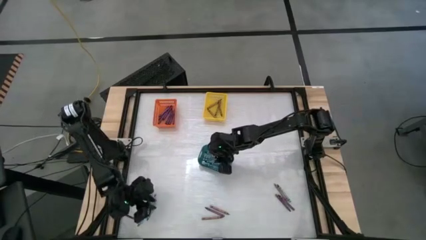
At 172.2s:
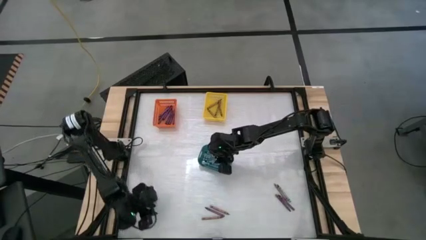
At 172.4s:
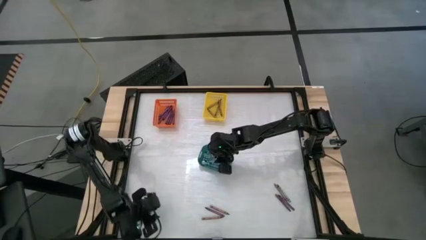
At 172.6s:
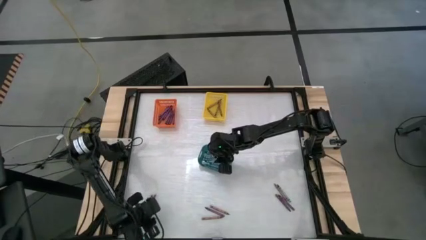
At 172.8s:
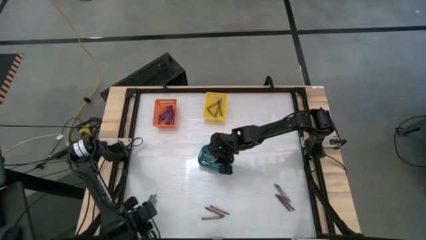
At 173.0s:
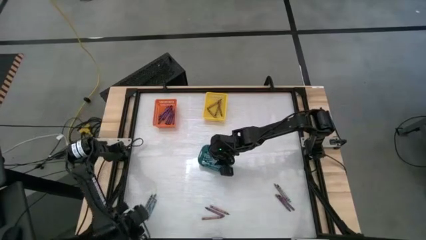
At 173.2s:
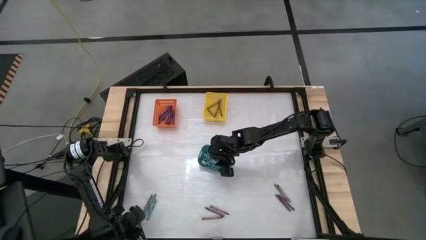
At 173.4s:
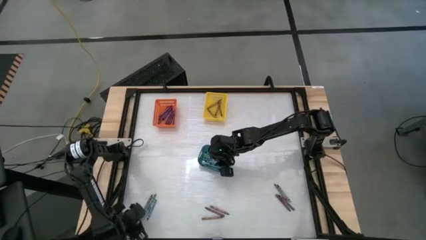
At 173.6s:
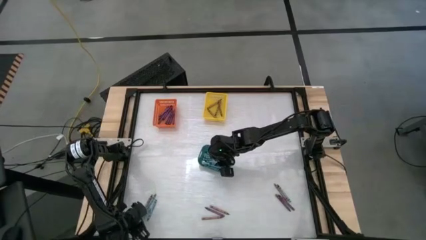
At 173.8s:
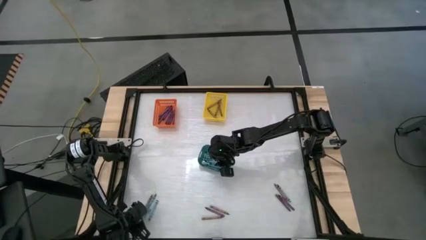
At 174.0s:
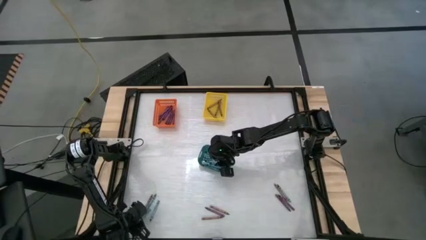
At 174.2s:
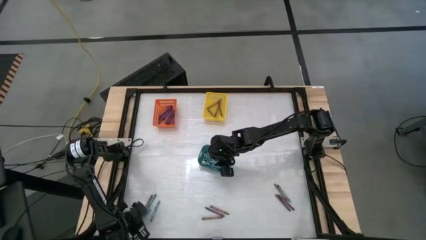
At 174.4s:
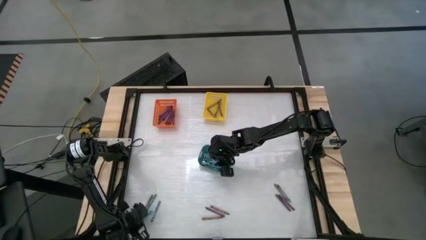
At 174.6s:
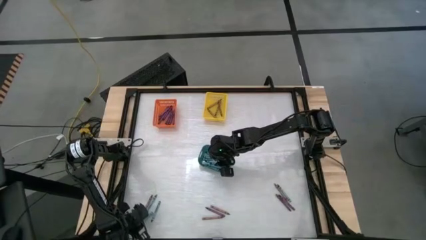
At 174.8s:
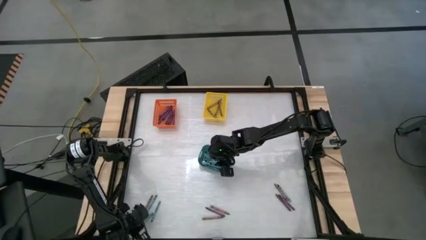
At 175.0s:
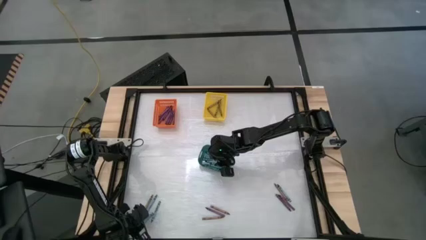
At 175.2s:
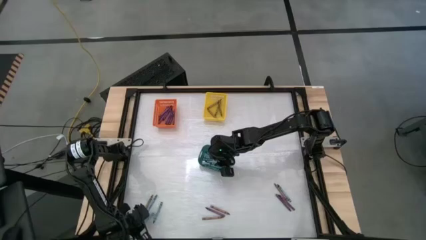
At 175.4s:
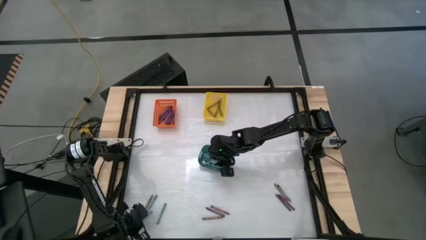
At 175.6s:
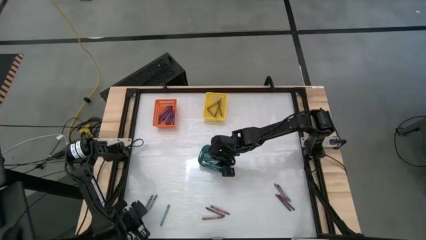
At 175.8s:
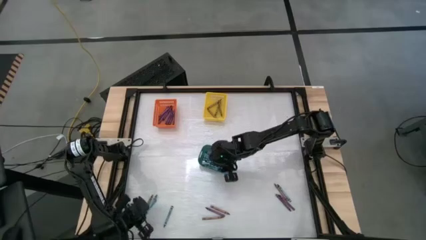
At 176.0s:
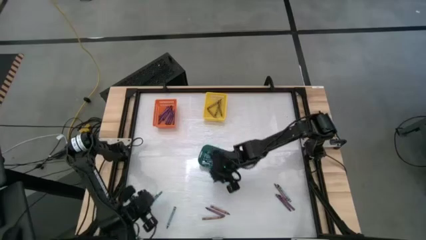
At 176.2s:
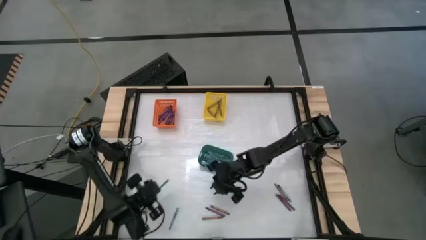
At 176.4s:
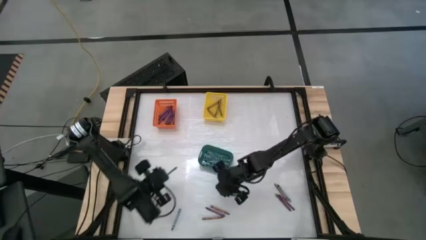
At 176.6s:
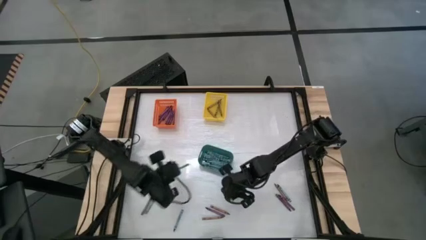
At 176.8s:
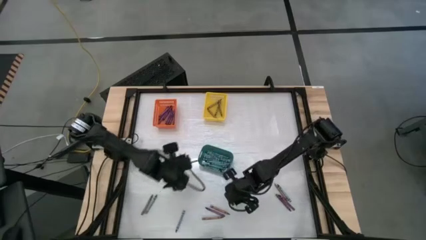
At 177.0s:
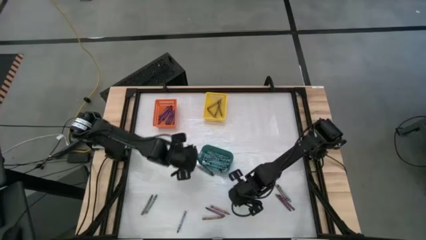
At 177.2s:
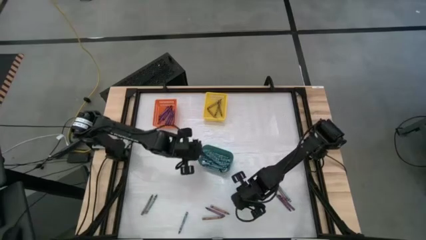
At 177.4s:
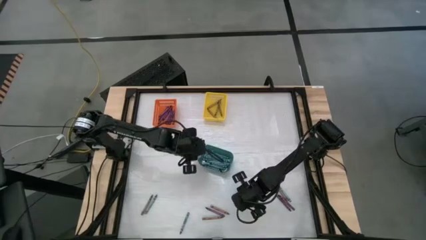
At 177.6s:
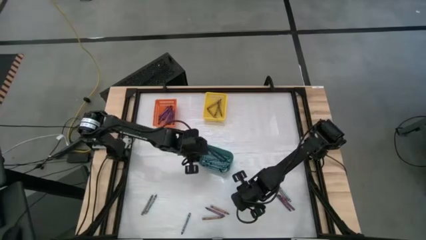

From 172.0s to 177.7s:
Task: Sort crayons
Put the blue crayon into the blue bin

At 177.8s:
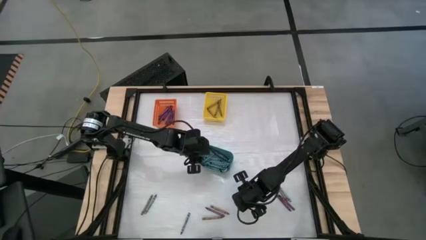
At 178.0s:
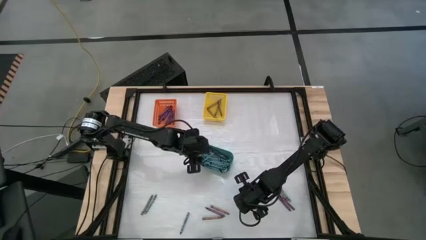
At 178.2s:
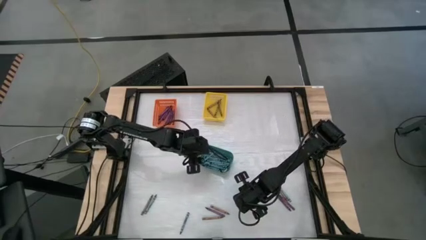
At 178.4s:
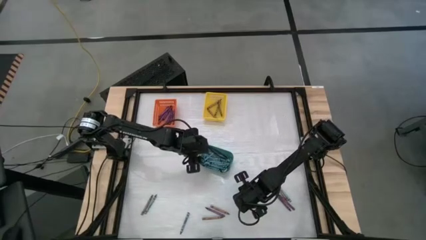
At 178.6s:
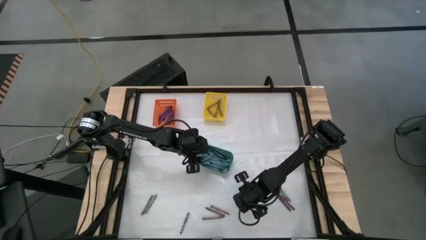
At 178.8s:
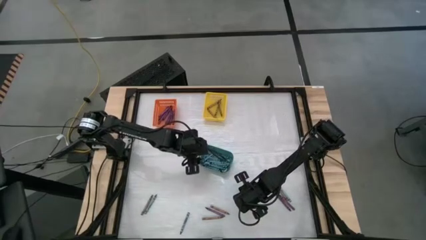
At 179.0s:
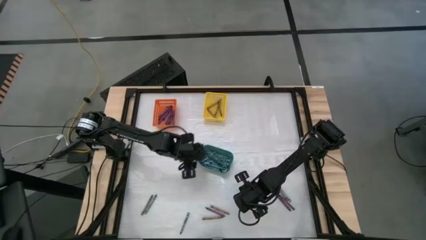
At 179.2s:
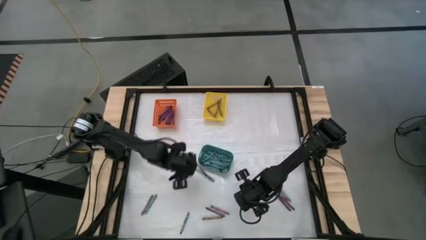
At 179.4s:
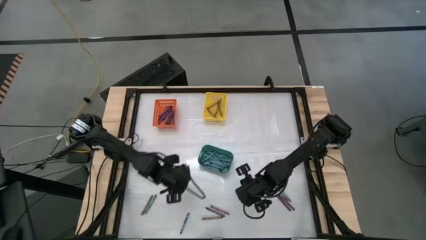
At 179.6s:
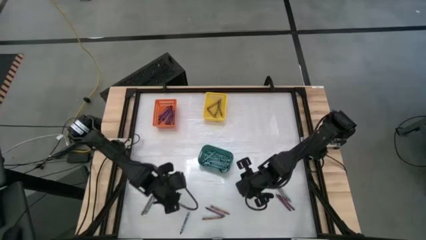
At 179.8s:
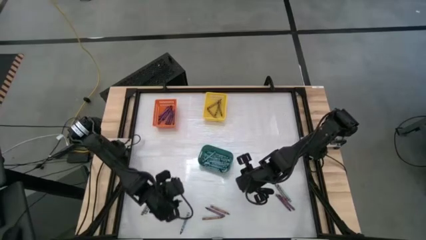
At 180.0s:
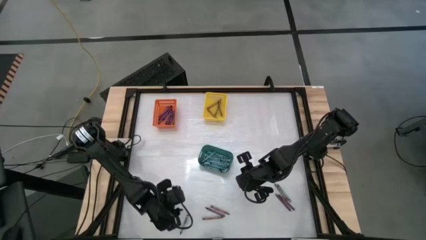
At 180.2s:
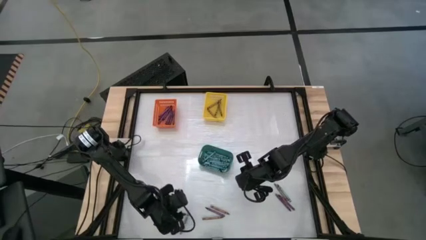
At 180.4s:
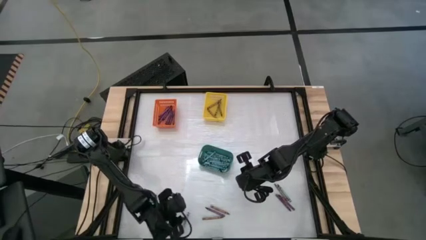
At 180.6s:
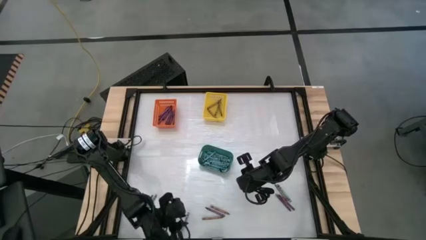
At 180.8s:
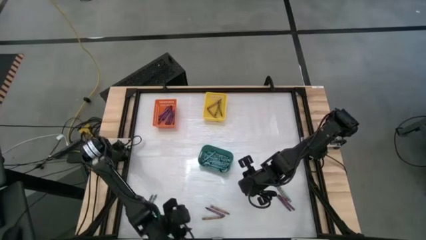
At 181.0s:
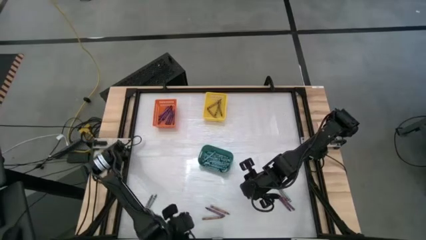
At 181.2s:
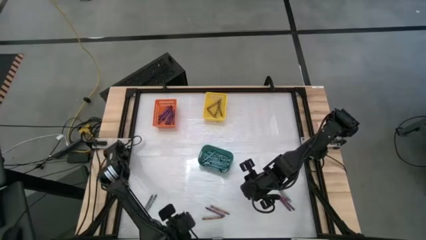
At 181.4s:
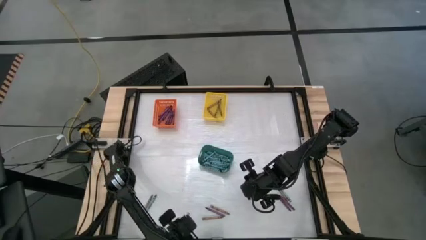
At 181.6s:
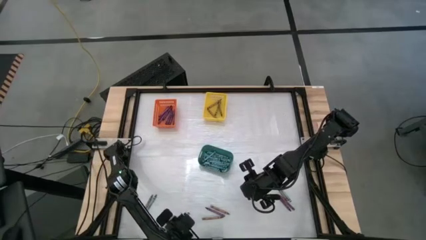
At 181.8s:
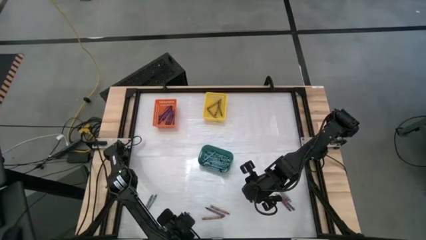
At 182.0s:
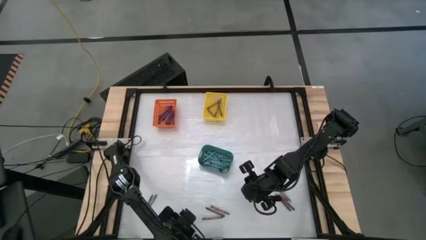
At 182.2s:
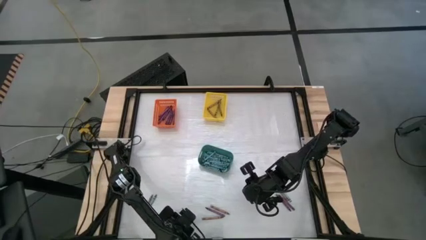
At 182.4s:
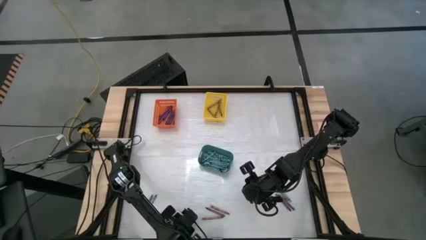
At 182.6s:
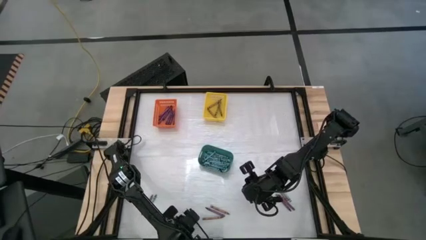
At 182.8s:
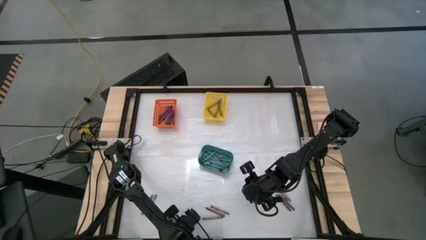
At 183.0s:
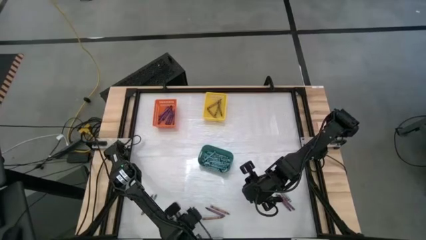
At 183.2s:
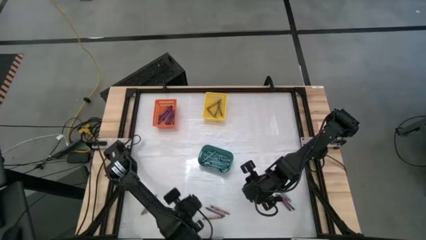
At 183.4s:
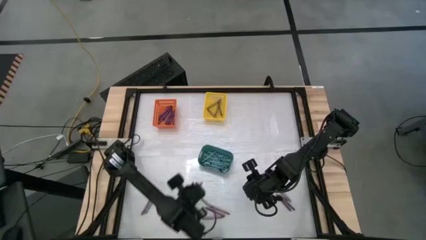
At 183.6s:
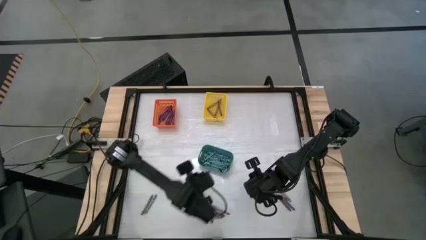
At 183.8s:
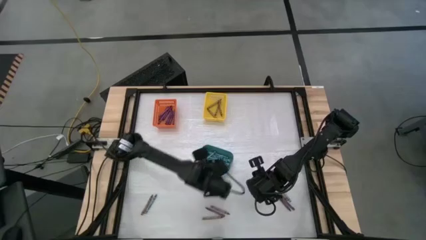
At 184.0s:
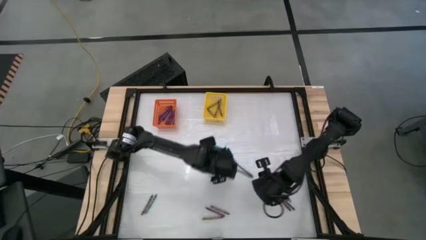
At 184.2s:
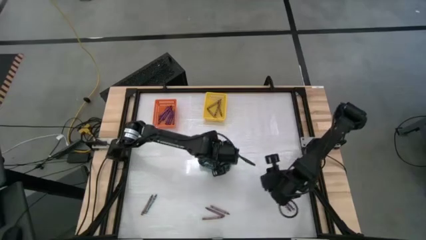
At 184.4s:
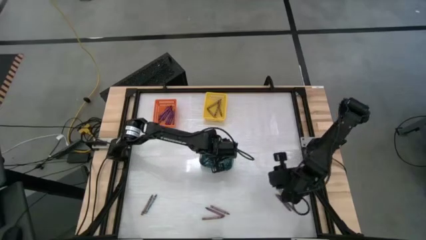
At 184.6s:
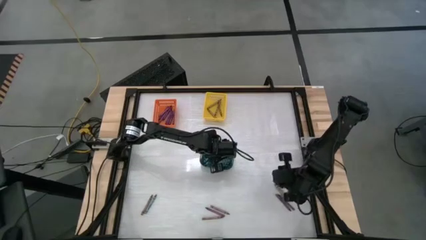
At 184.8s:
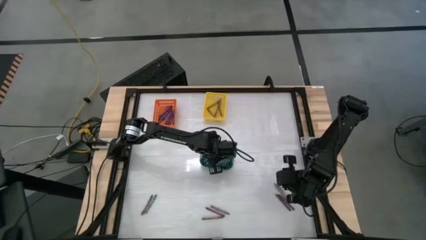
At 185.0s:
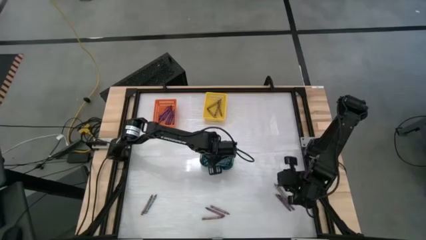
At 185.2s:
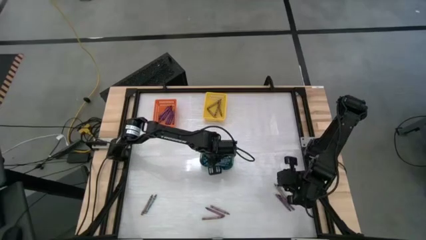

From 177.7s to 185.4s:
Put the blue crayon into the blue bin

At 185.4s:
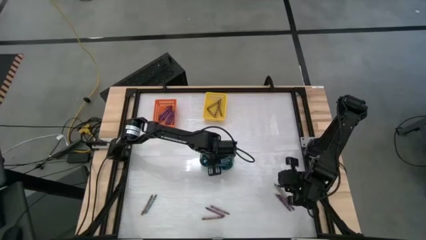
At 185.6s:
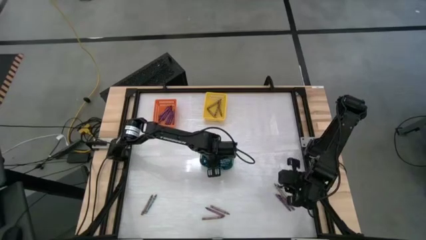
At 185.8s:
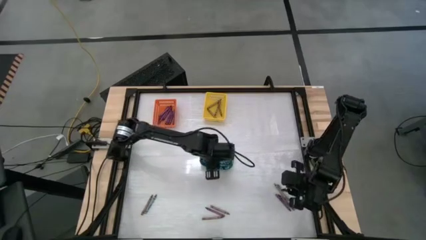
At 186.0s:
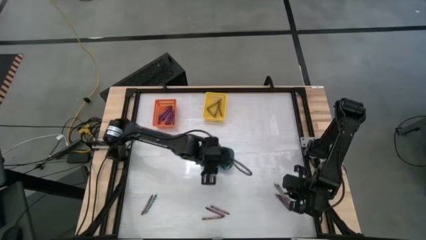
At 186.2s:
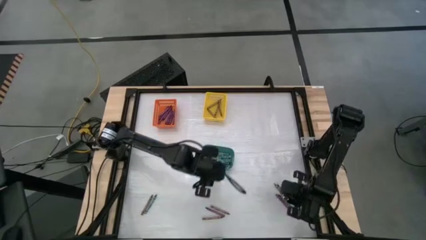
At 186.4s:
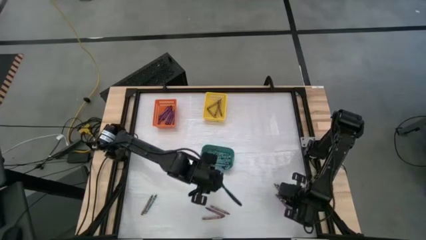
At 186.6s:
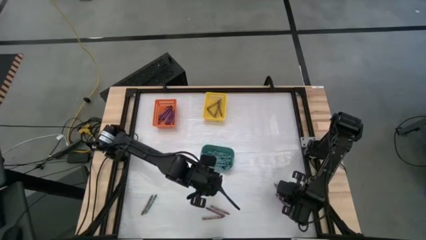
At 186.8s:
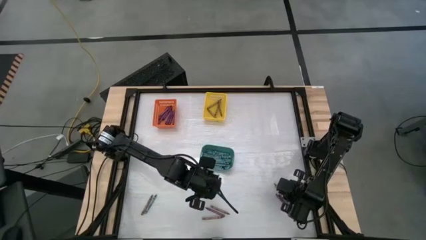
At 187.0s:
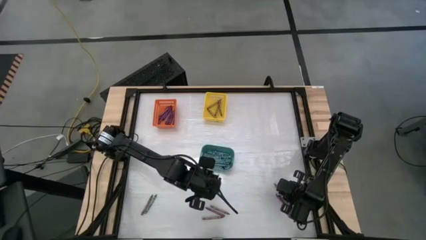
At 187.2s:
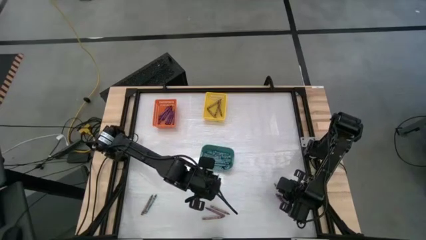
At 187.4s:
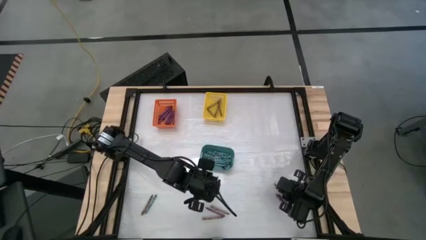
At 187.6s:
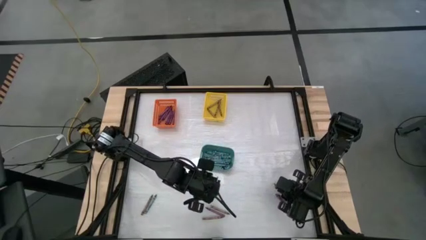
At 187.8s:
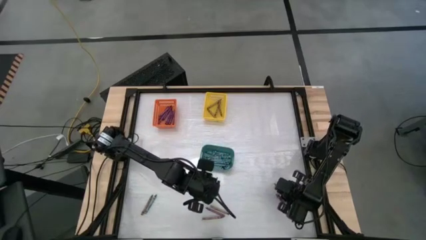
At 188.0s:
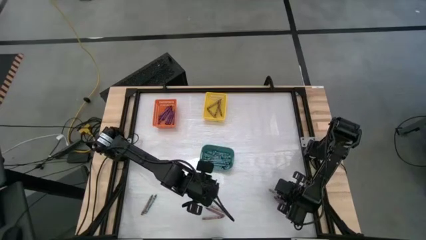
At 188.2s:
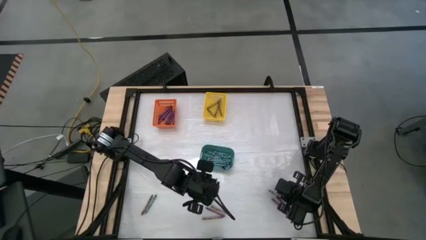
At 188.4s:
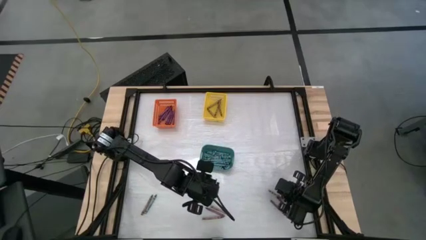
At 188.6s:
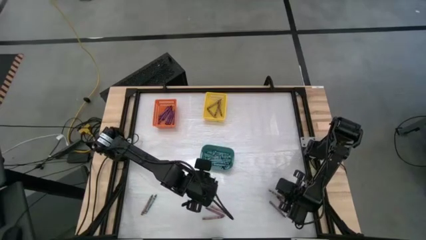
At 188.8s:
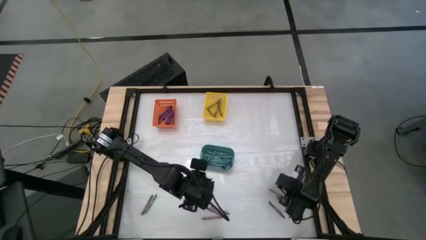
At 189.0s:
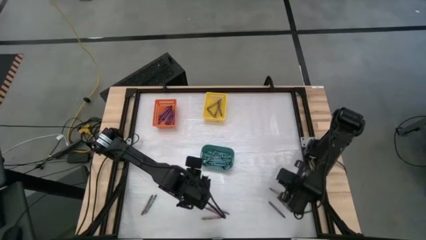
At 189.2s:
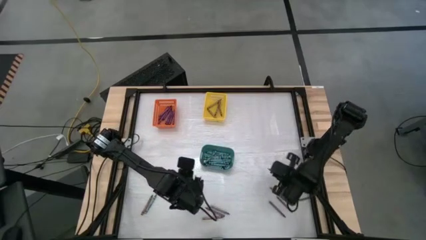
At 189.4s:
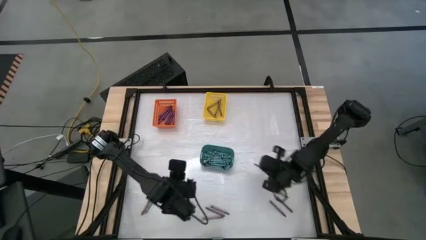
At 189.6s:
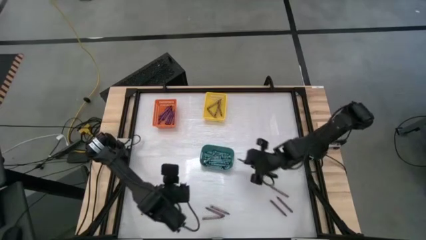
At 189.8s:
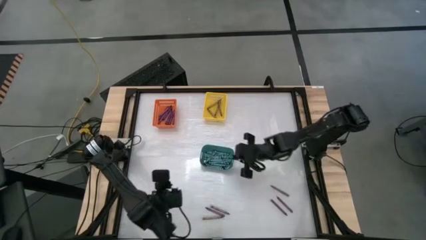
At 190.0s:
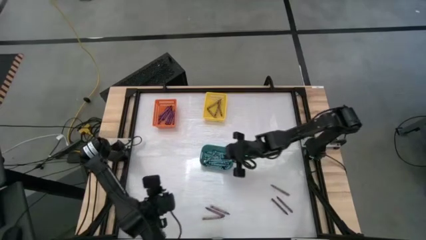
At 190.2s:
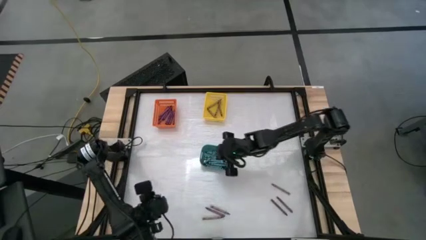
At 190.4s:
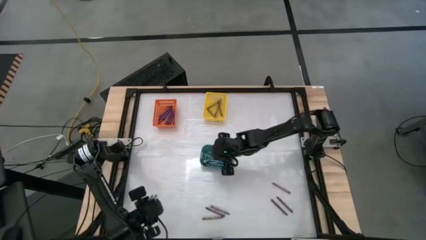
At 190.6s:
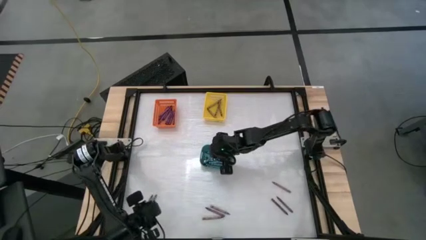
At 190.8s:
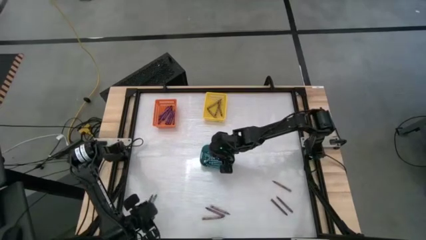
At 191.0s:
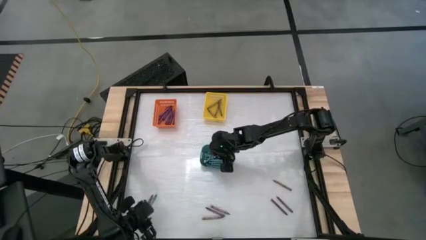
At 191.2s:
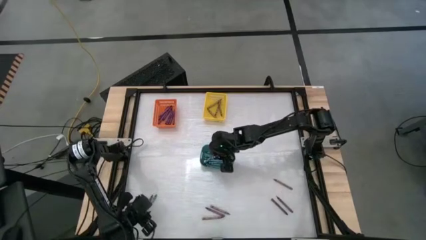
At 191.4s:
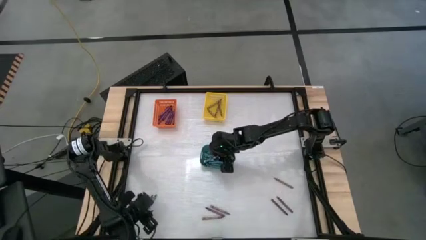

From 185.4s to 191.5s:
Put the blue crayon into the blue bin
